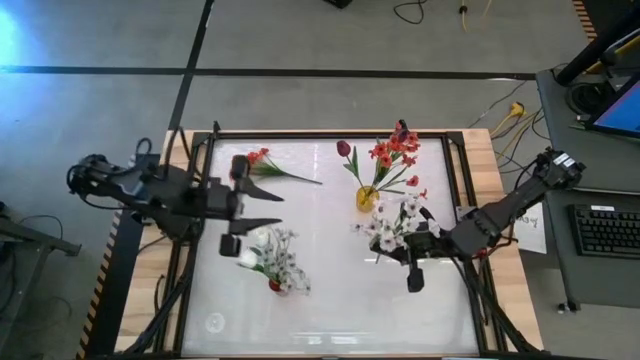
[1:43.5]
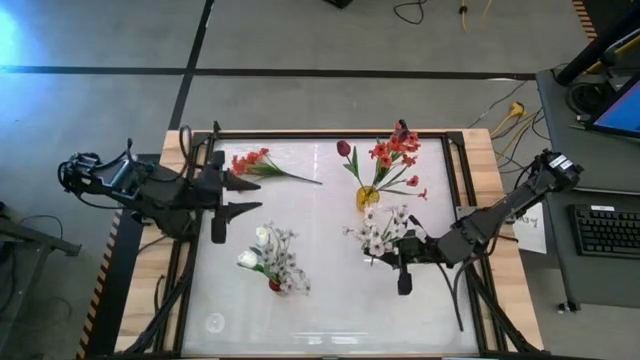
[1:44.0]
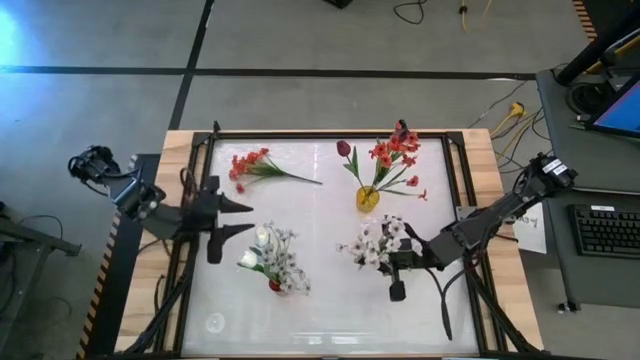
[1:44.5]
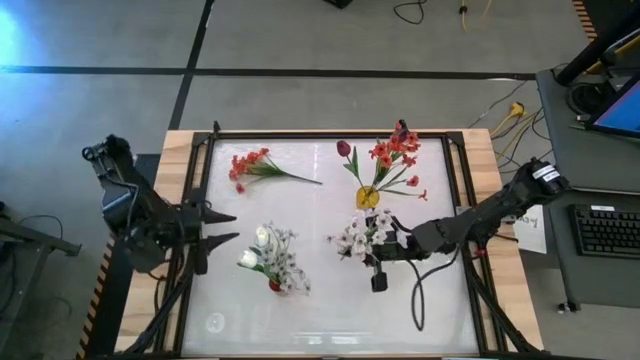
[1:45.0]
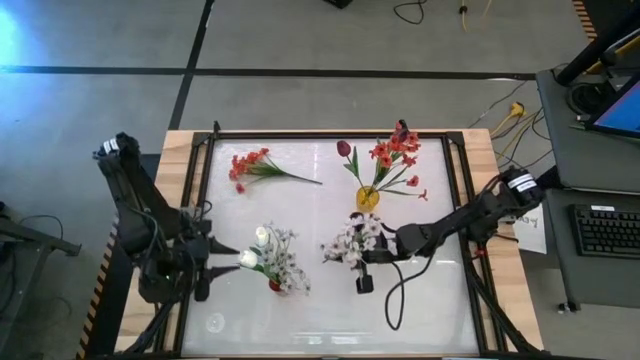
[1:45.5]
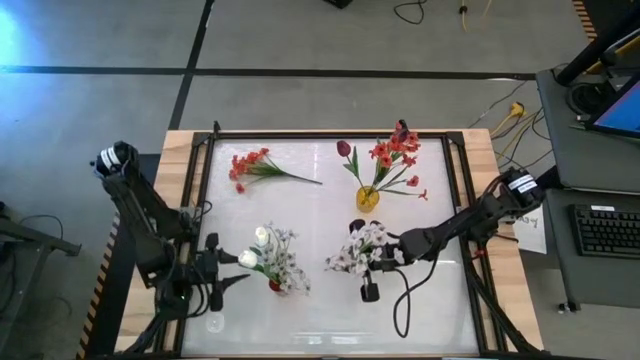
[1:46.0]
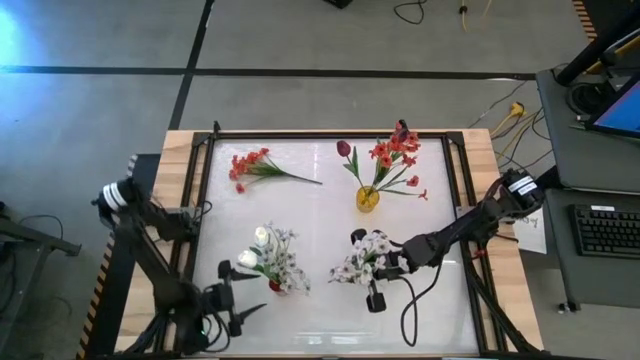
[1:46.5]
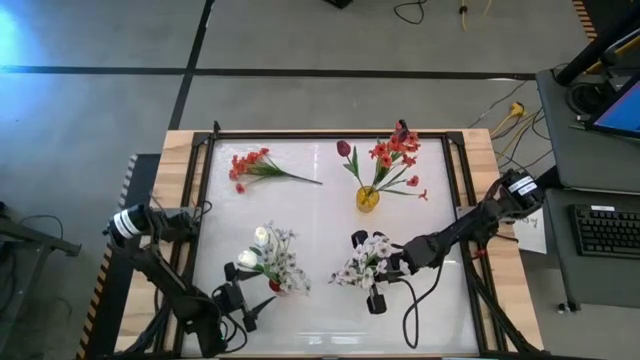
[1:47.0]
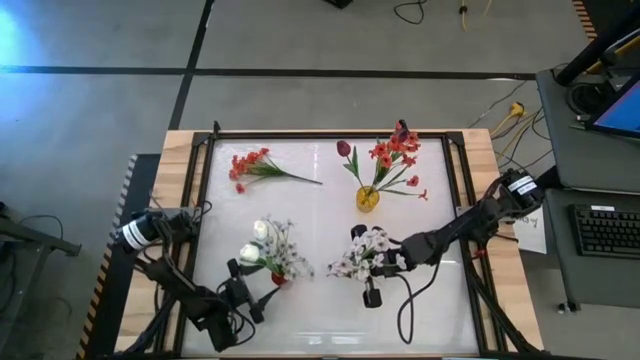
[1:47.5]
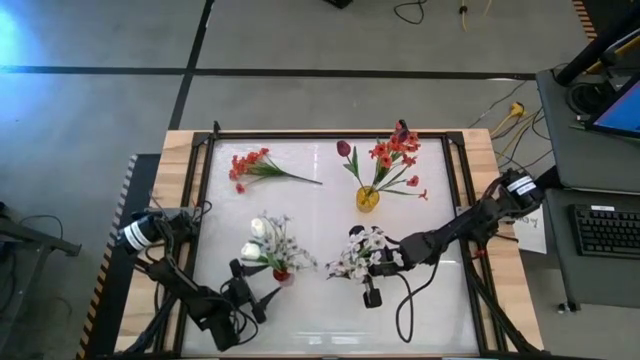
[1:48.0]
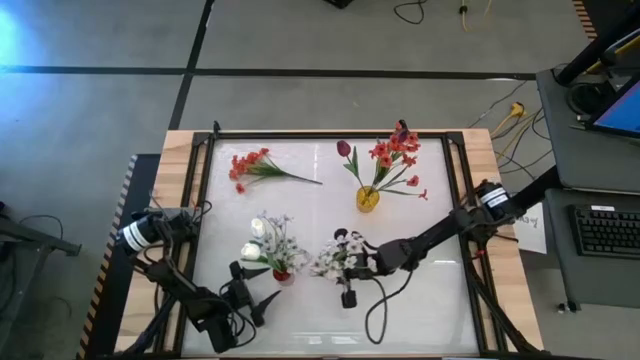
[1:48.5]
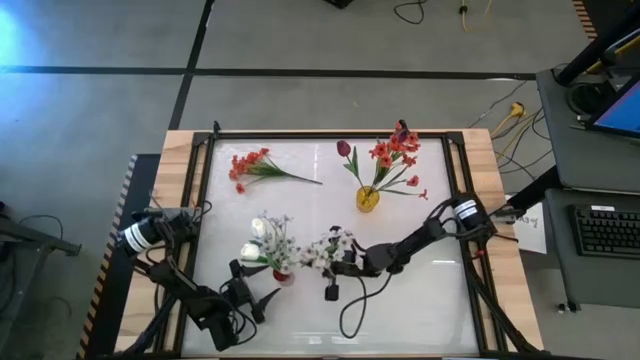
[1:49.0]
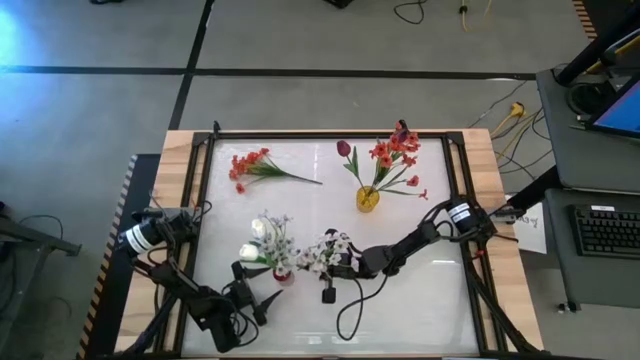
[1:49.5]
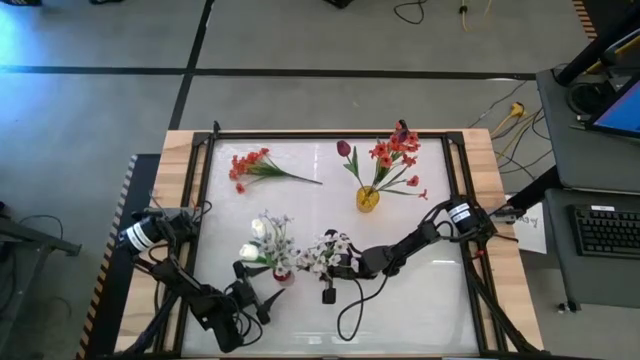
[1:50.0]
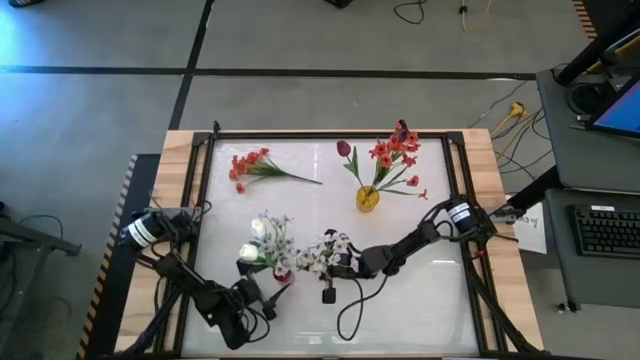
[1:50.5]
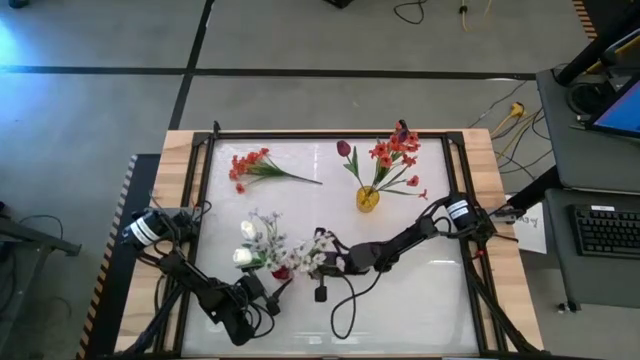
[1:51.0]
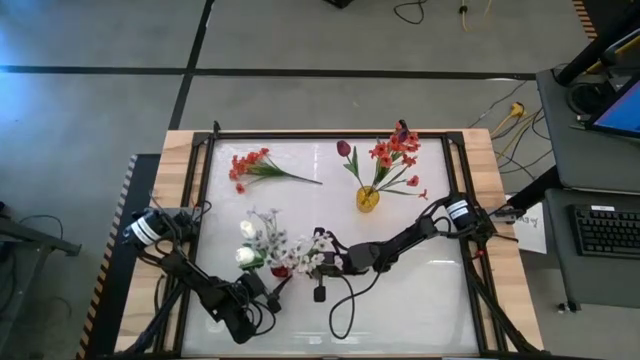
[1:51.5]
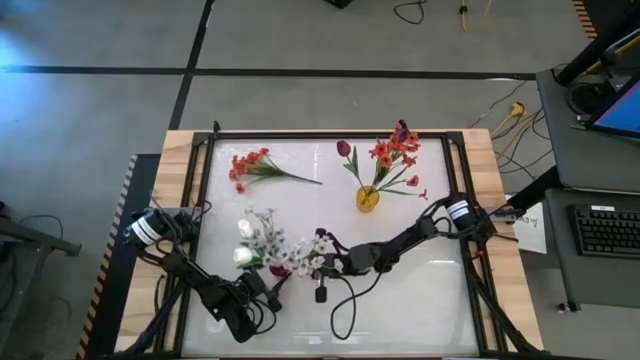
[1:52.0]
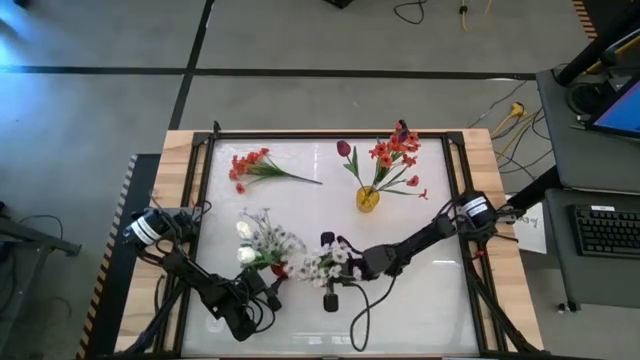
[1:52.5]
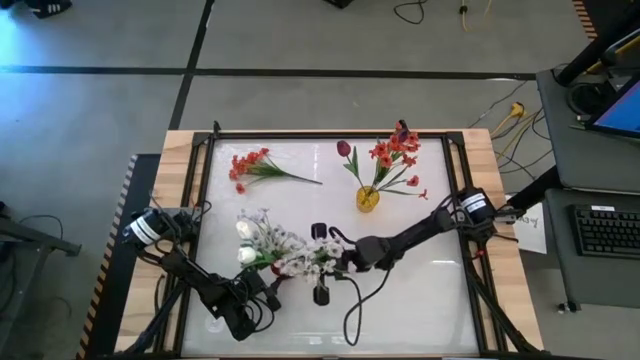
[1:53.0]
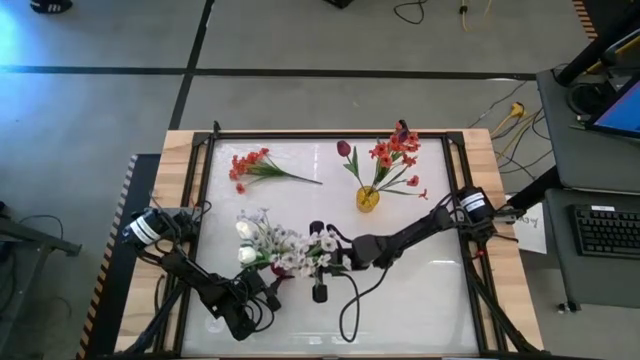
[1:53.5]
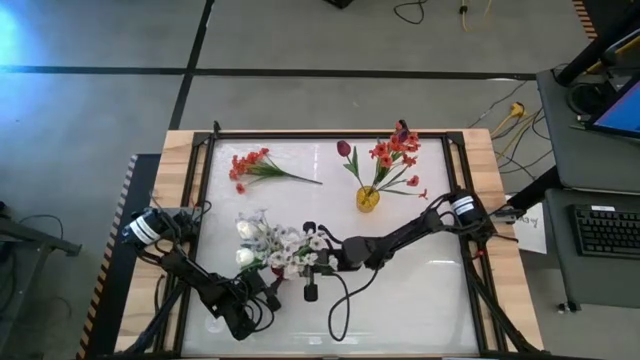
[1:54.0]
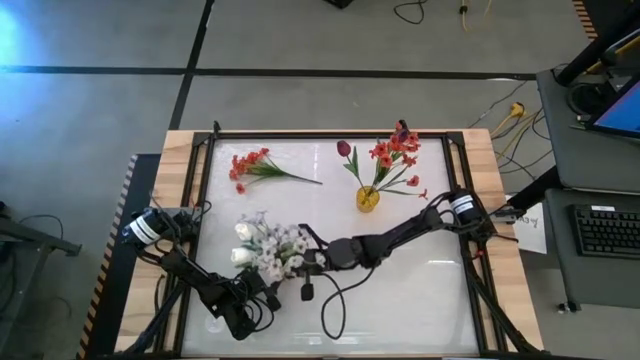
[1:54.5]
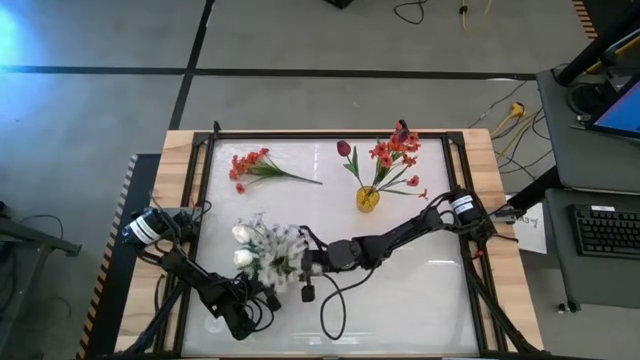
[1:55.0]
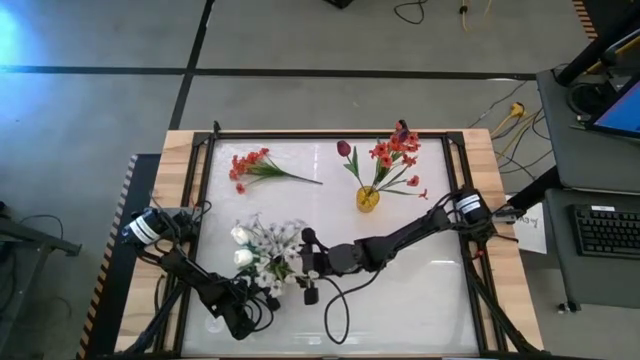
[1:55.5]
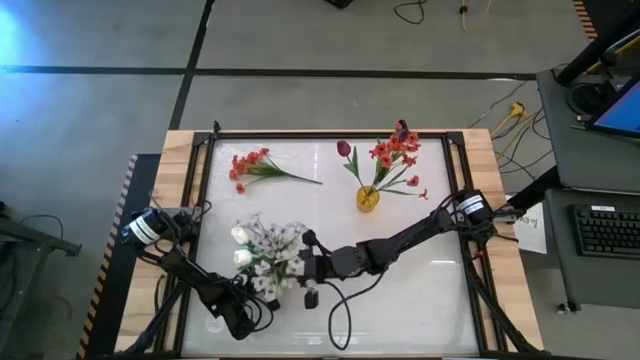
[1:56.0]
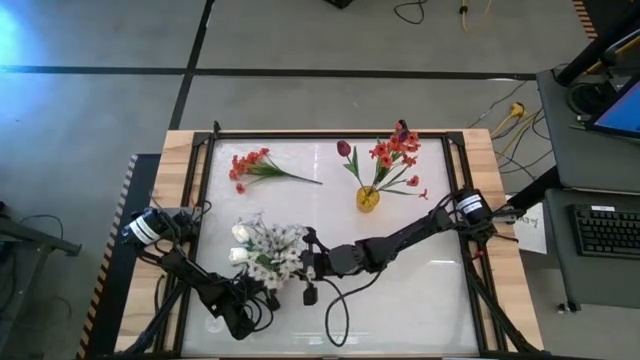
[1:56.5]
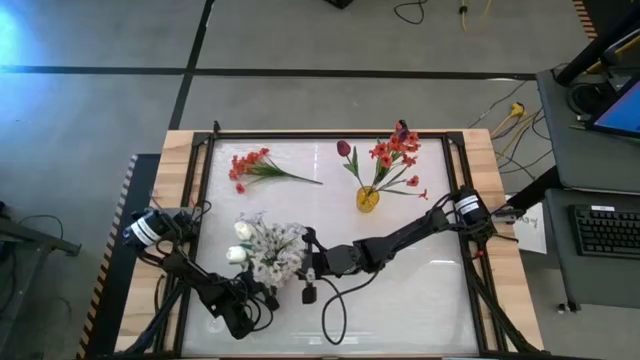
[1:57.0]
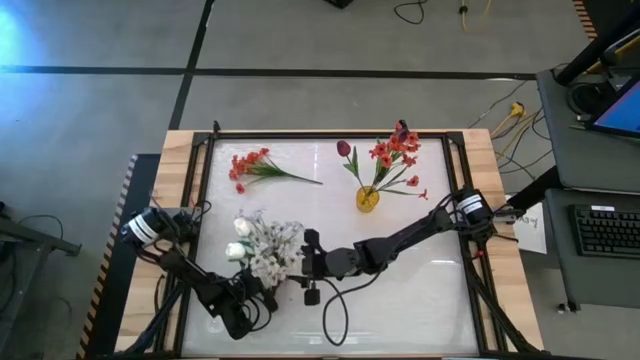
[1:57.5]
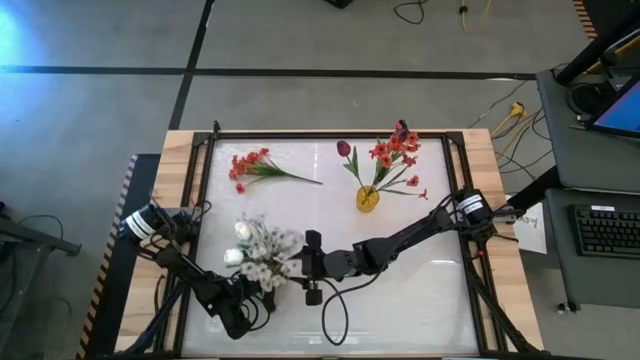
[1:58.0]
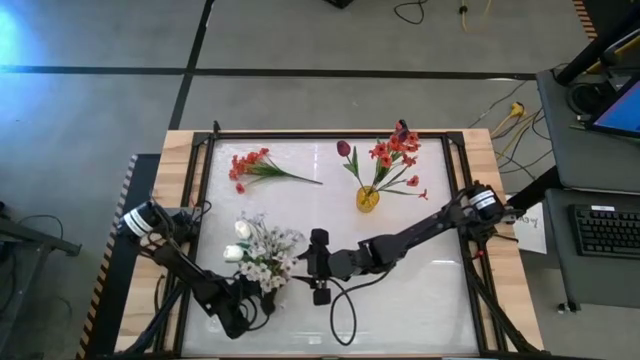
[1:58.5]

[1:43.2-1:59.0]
Task: Sort flowers into vase by color
Put the white flowers into the red vase

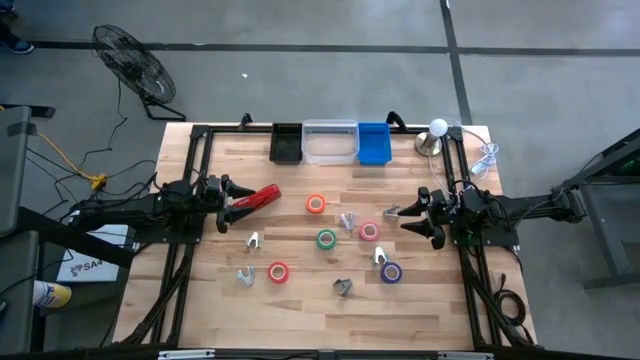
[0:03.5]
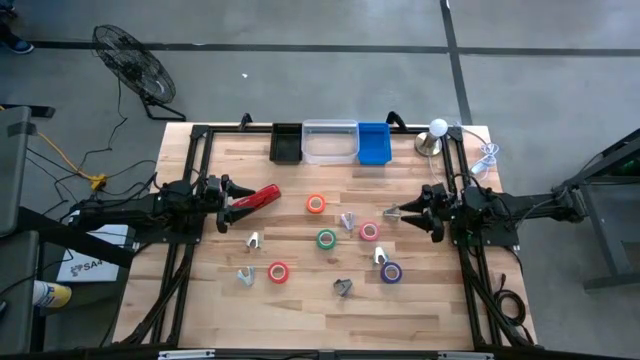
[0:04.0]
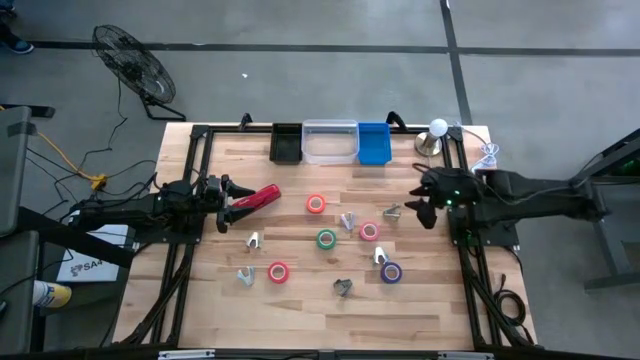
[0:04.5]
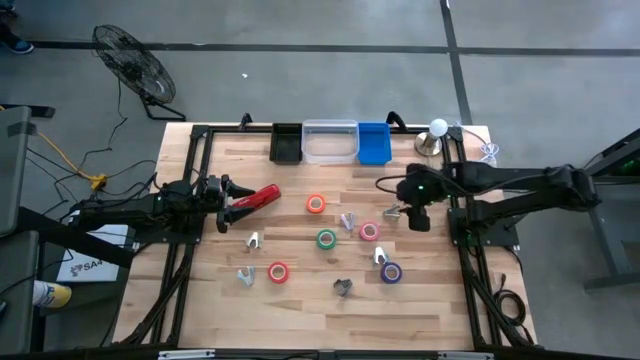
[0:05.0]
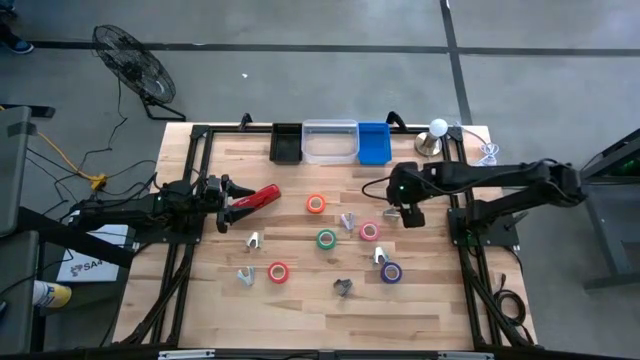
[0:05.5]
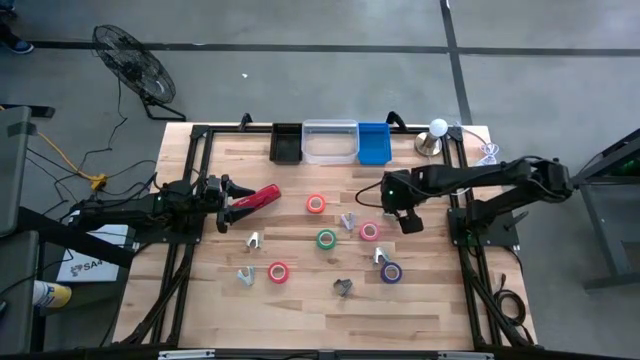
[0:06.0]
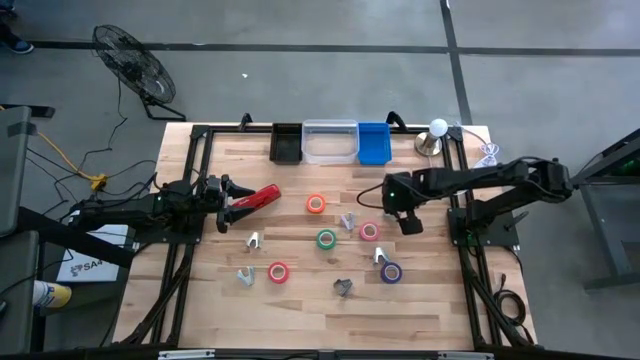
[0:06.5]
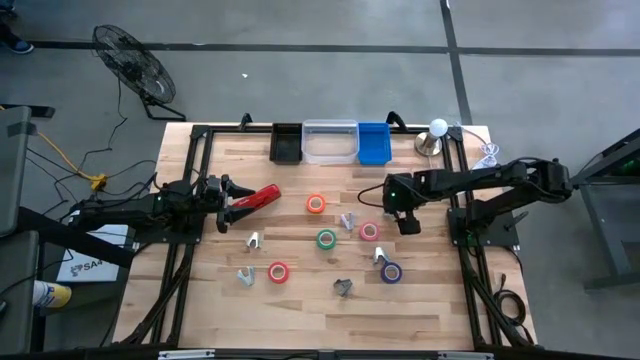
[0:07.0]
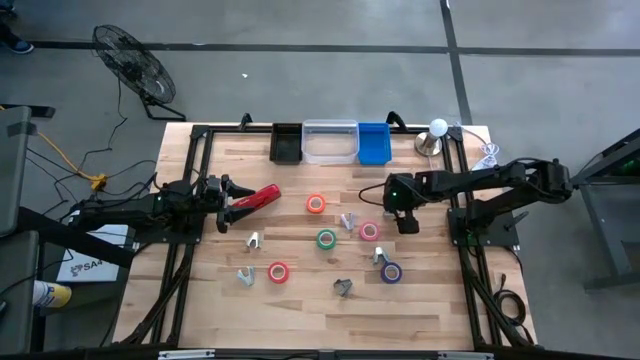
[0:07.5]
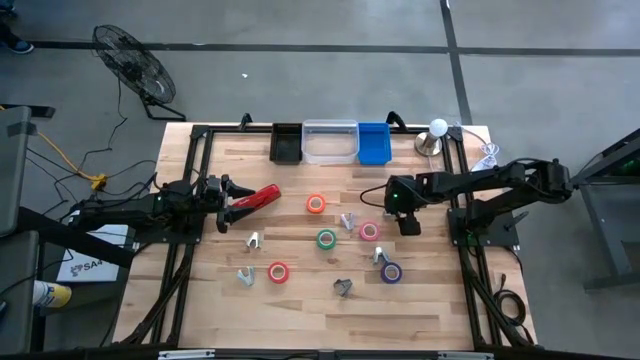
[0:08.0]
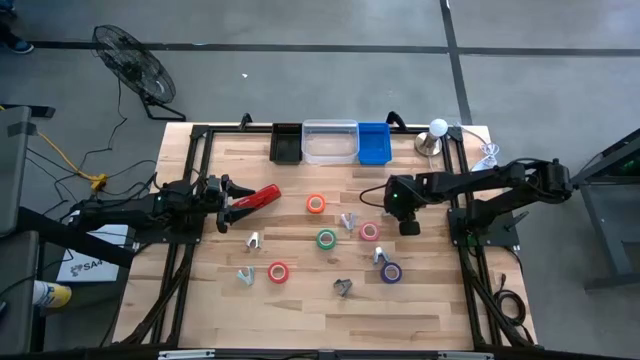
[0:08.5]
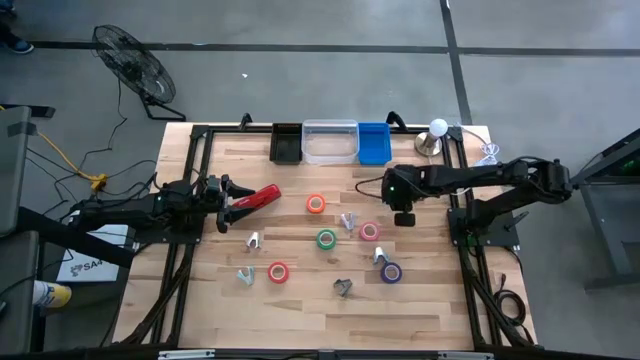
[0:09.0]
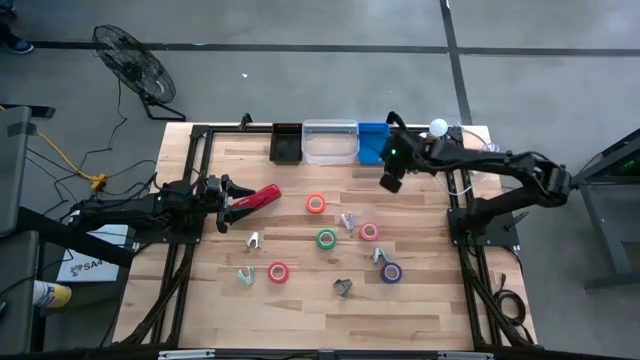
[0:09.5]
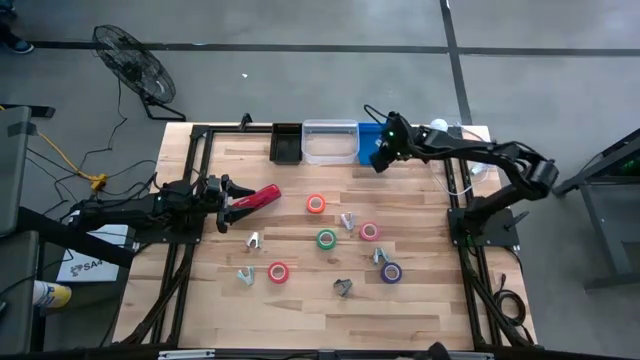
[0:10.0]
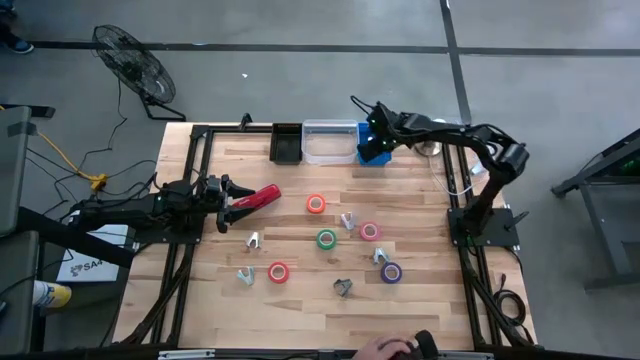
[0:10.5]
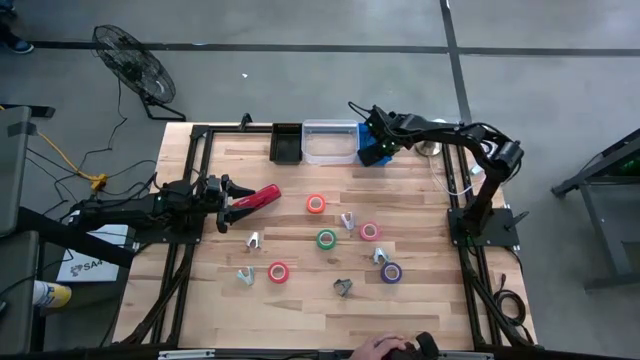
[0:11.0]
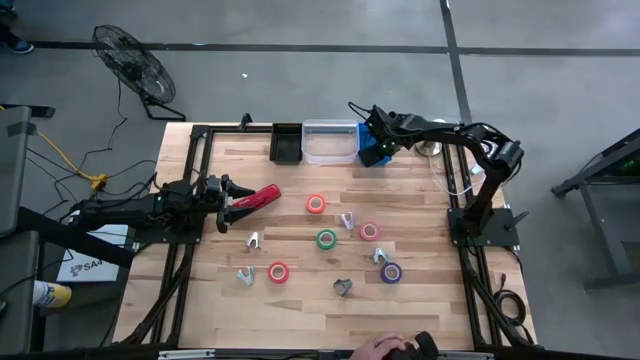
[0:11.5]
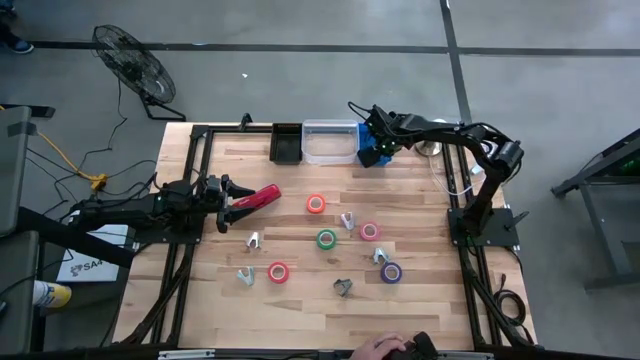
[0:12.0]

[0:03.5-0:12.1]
Task: Pick and place Stapler, Stapler remover, tape
Put the top gray staple remover into the blue bin
